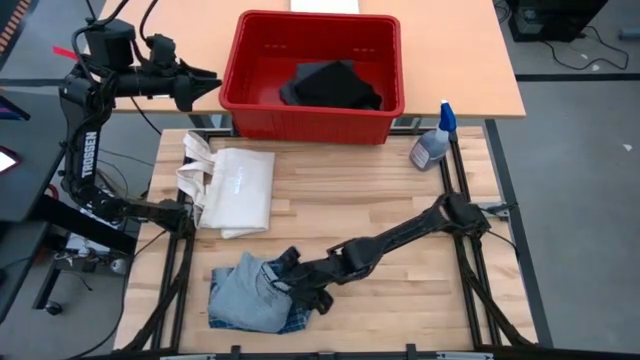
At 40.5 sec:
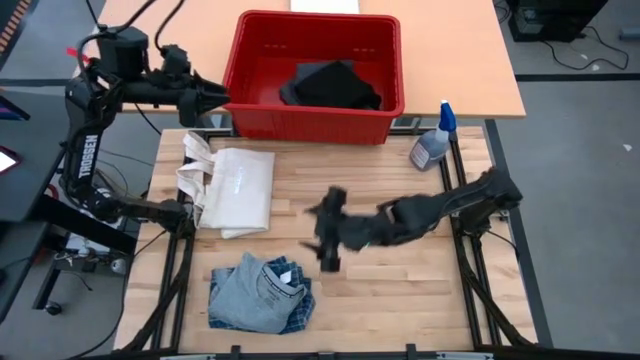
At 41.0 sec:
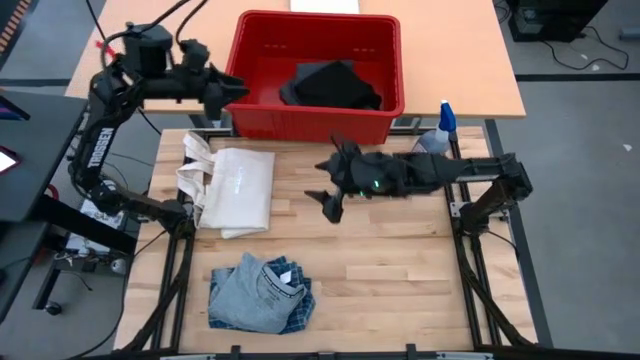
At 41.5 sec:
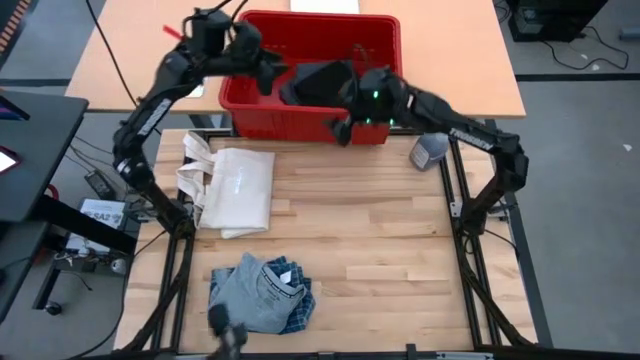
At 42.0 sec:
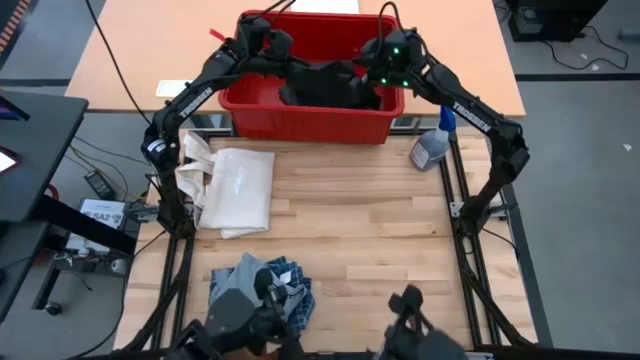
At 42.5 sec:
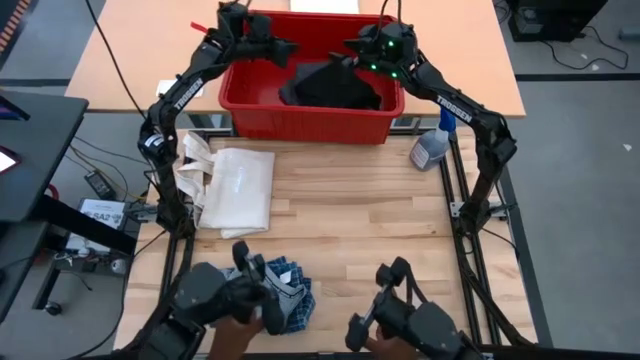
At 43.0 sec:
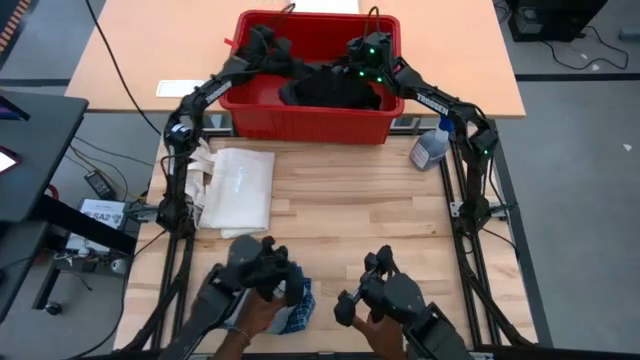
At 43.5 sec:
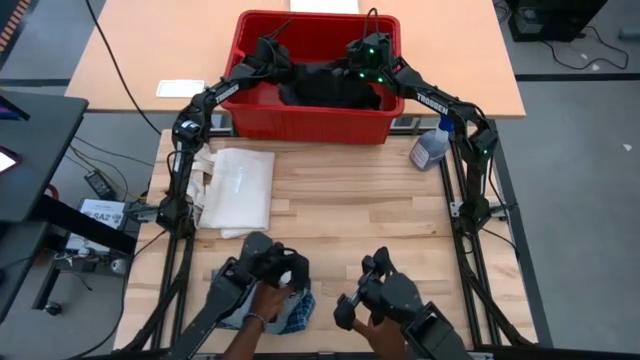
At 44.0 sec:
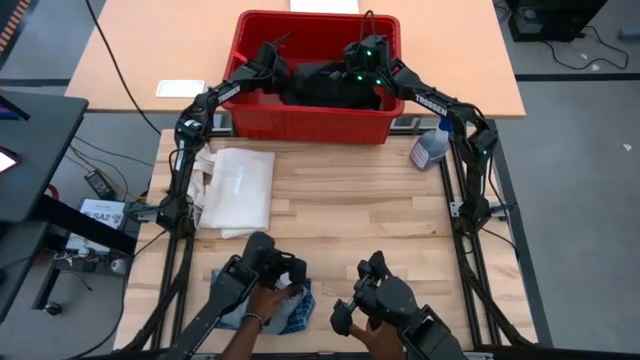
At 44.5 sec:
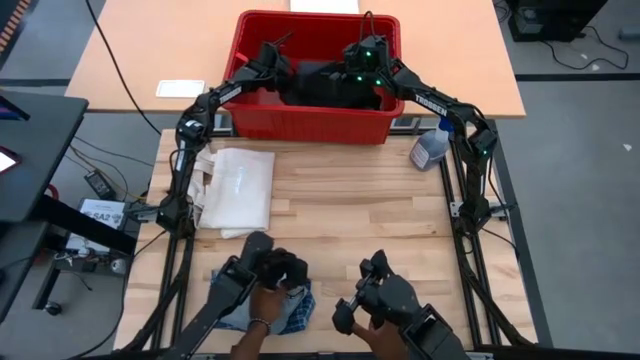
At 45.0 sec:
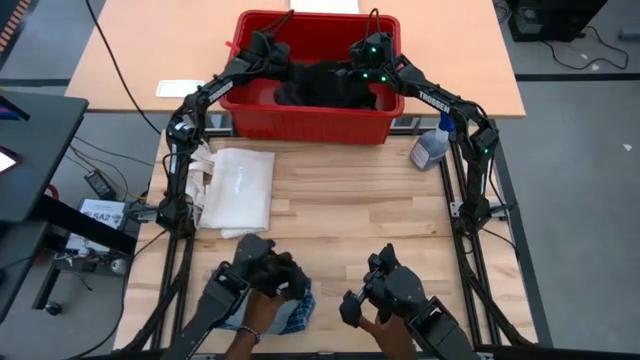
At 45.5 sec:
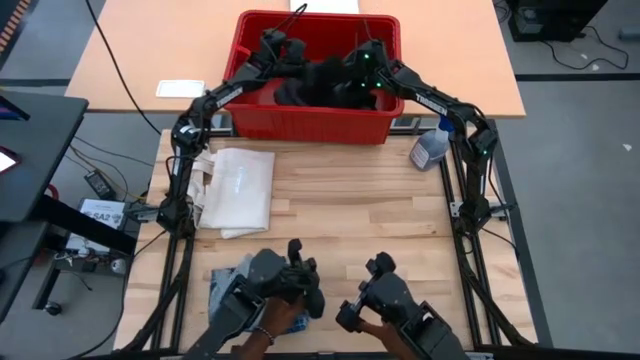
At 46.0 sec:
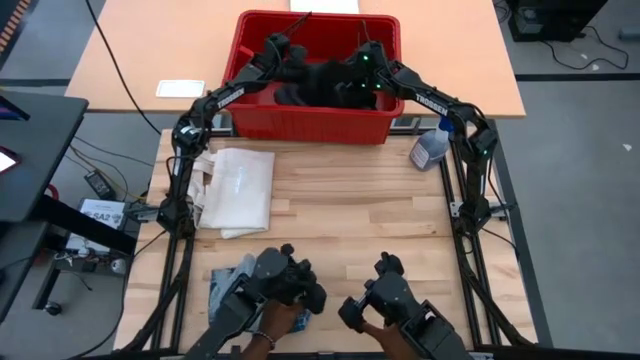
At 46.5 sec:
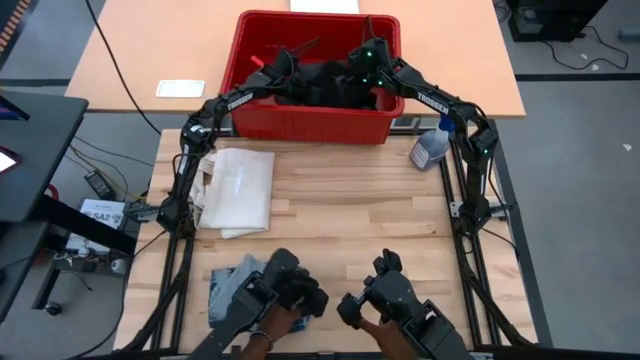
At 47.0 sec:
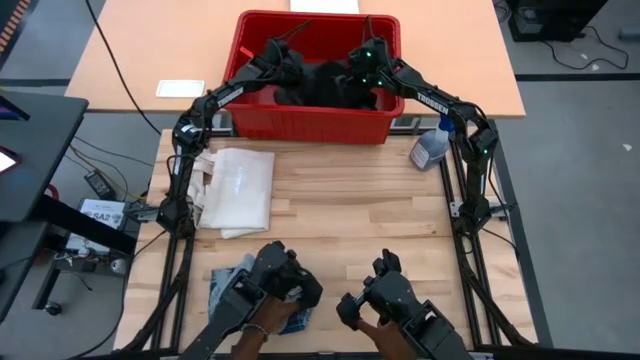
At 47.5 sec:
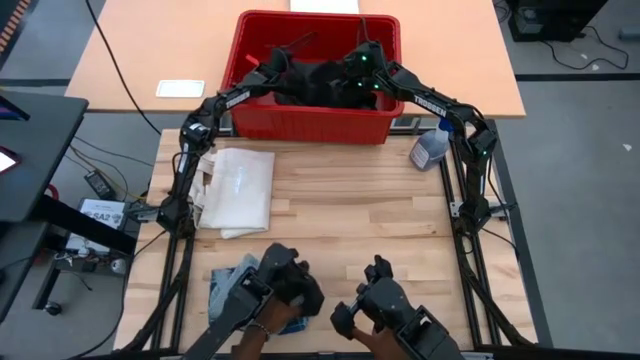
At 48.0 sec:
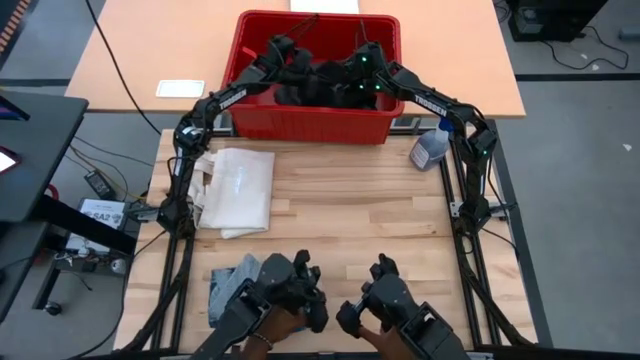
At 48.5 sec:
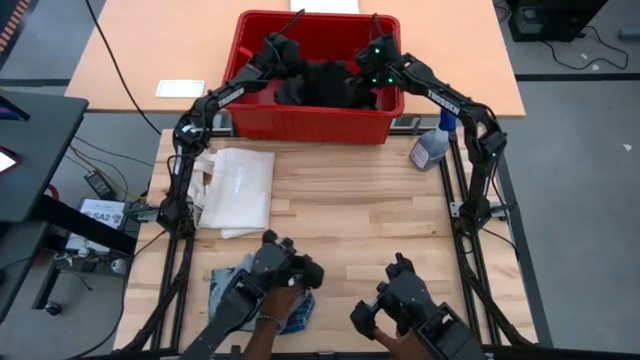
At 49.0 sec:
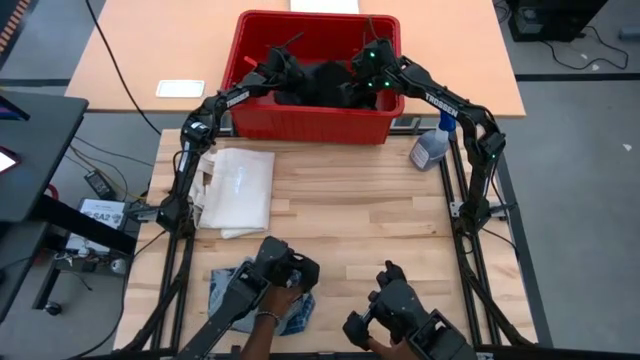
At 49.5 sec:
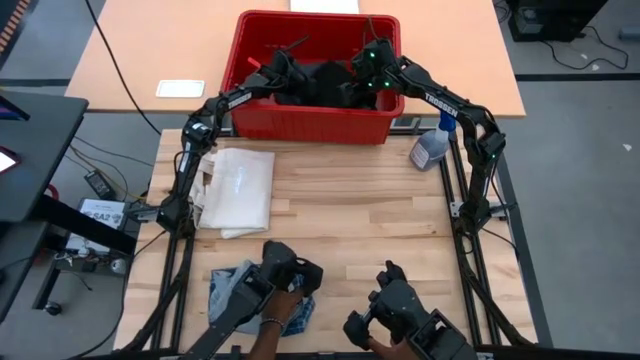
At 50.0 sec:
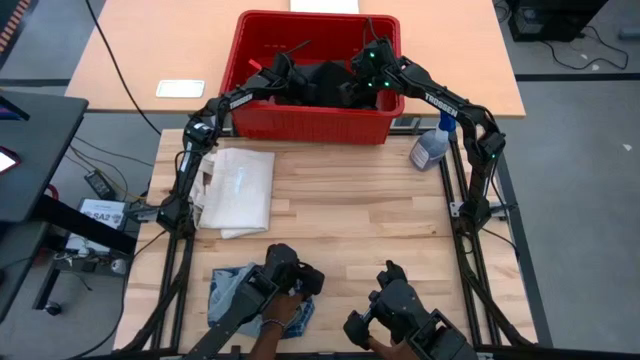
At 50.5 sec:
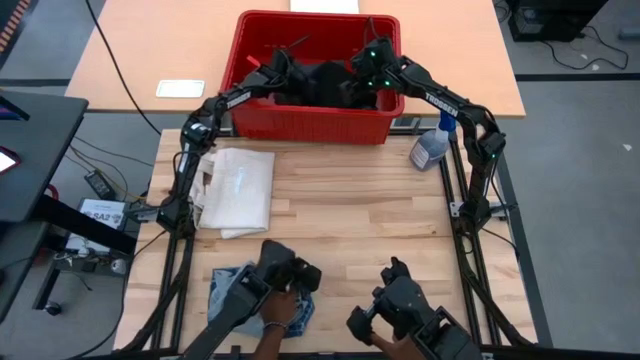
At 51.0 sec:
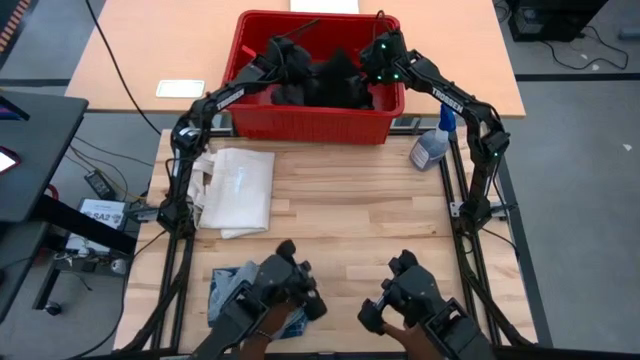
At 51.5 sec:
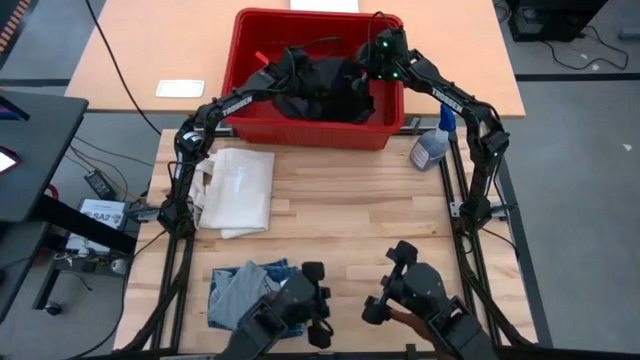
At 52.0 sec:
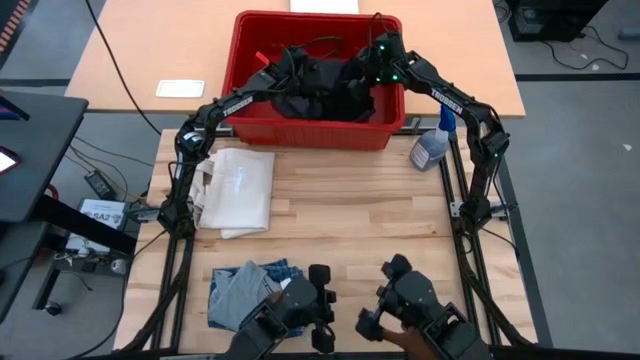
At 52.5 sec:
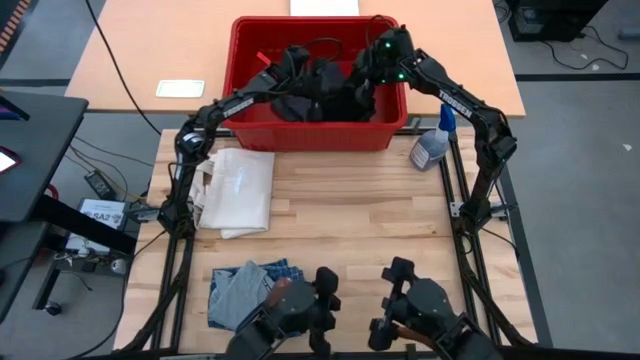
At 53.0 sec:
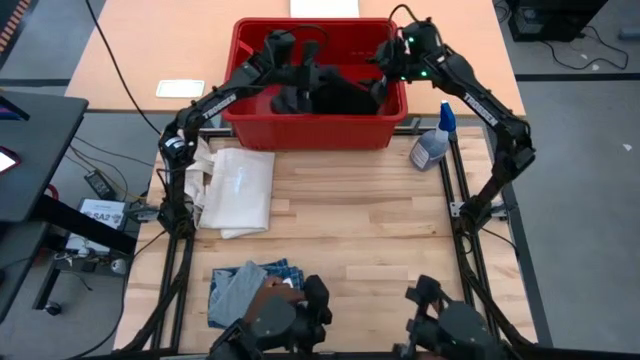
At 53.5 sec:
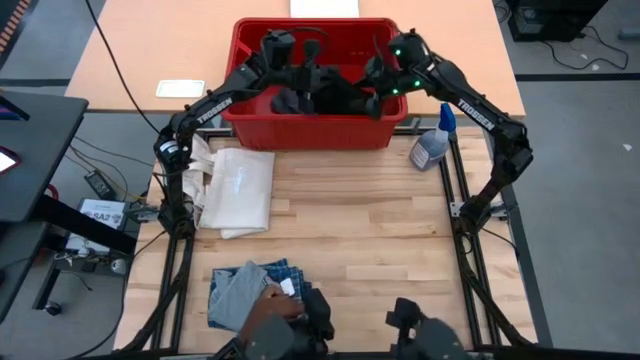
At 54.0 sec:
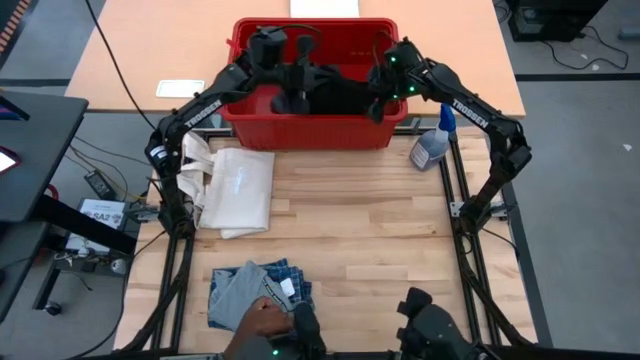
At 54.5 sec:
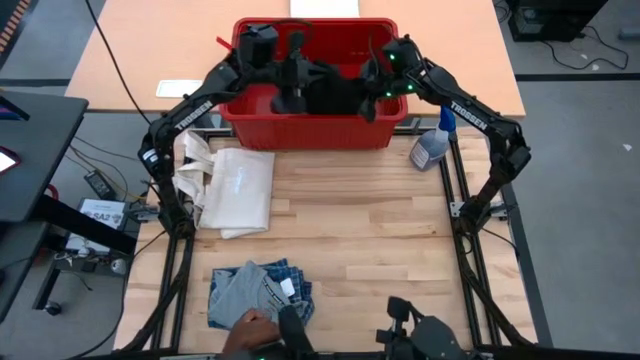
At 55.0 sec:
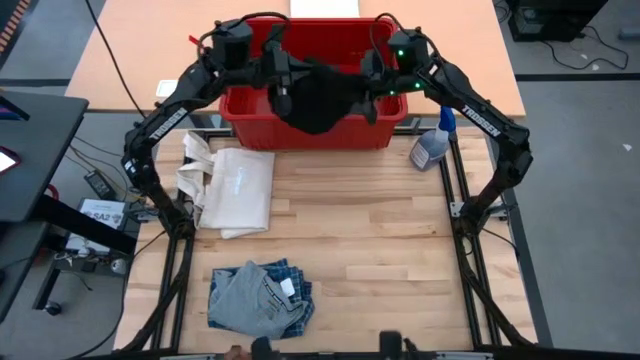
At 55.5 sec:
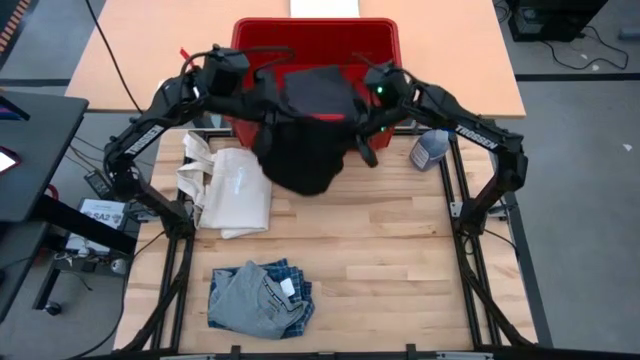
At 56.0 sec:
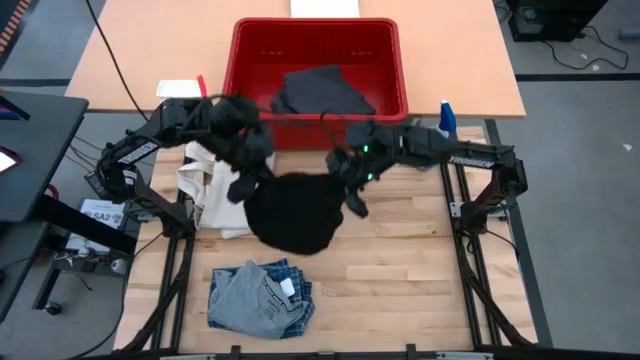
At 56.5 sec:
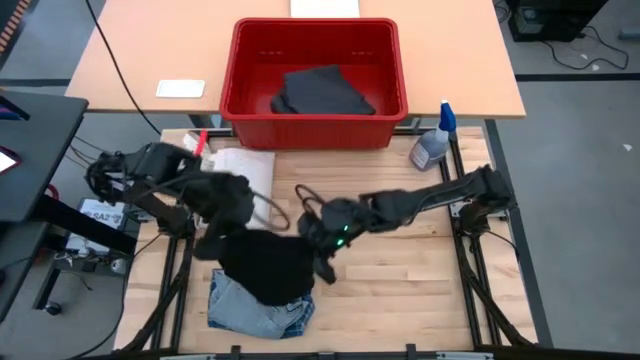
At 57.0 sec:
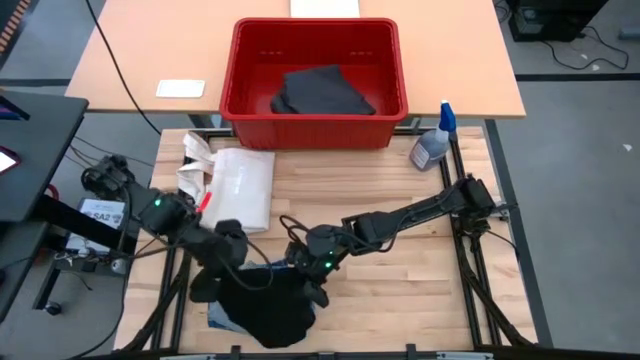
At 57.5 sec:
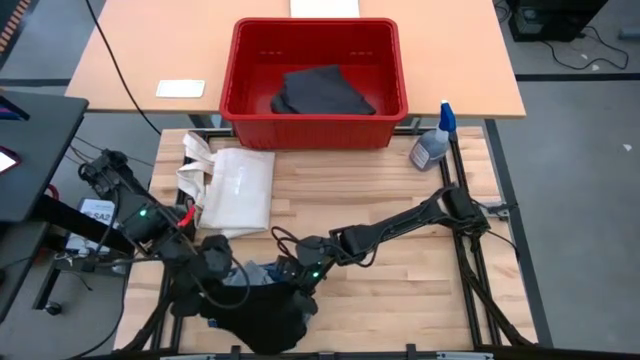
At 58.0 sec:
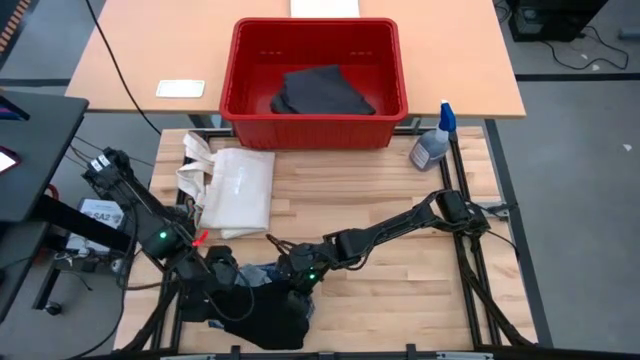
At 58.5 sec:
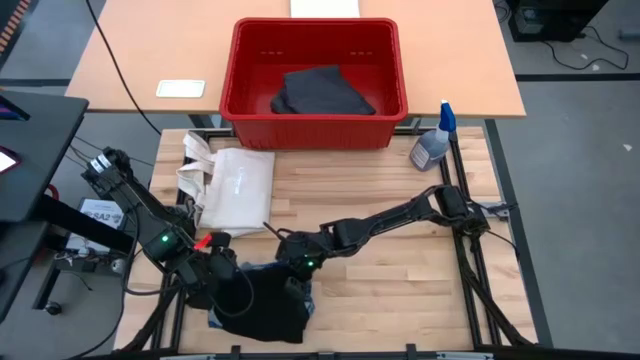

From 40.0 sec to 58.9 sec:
Task: Sort clothes
Remove the black pants from the red bin

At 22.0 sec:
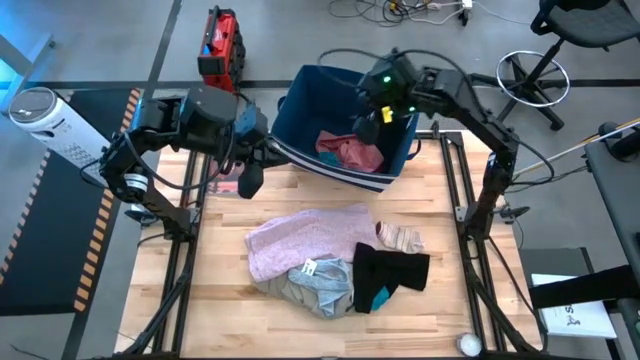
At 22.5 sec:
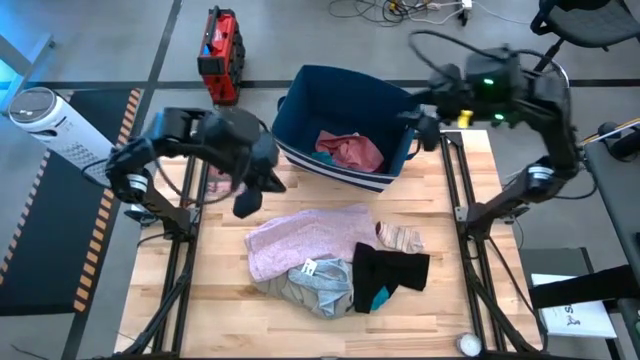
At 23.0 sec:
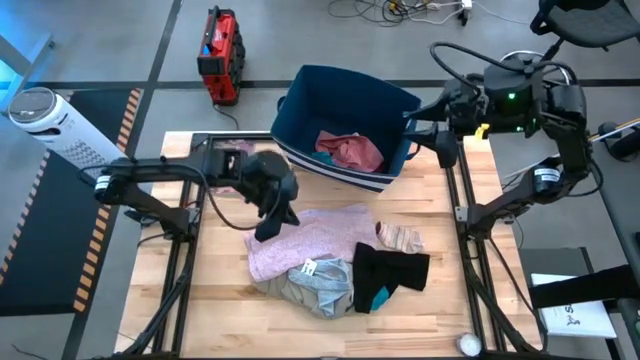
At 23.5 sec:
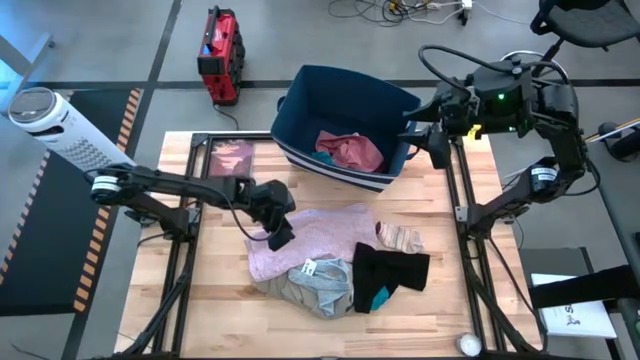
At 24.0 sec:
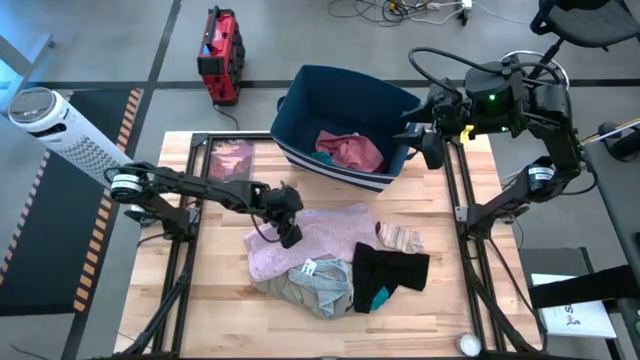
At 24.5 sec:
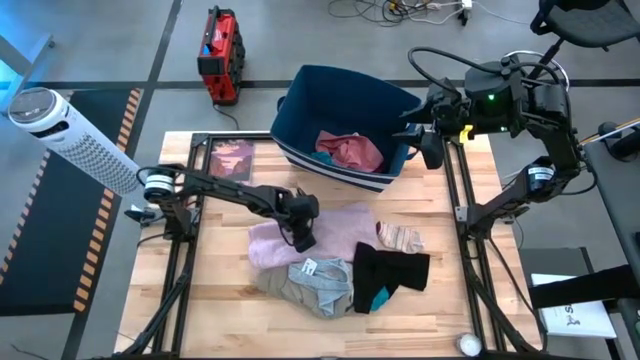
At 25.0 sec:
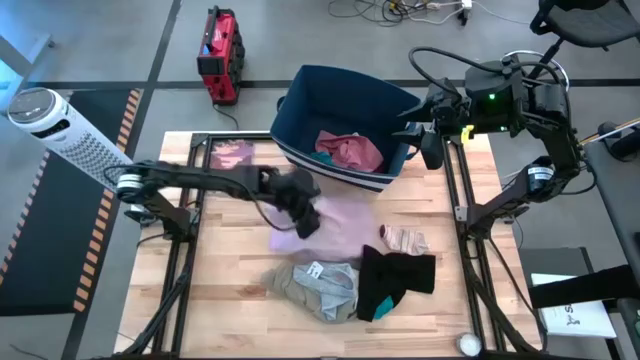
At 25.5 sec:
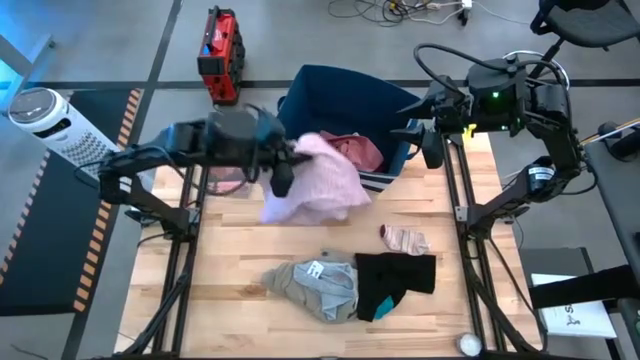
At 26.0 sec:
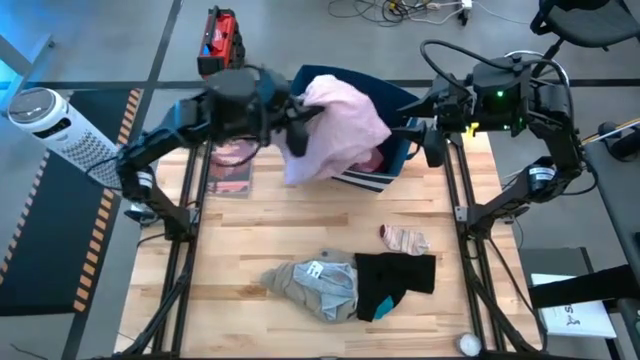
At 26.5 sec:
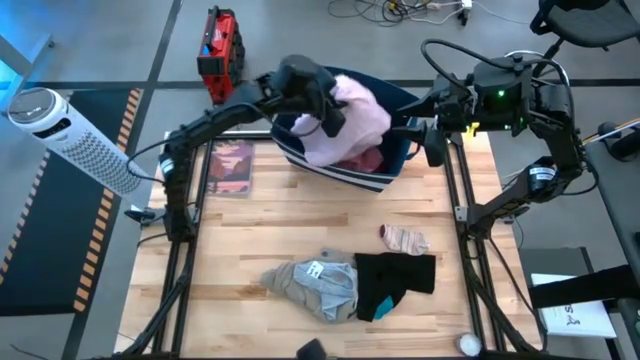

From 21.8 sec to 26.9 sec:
Task: Sort clothes
Put the light pink shirt into the blue laundry bin
